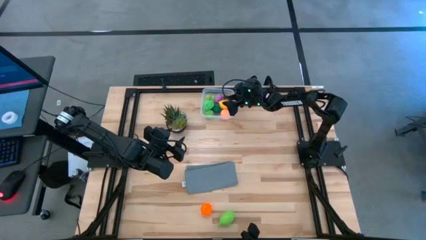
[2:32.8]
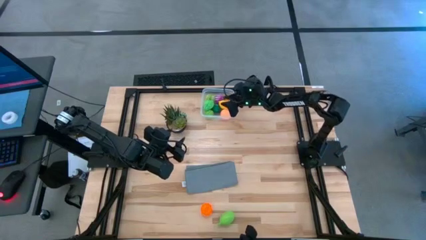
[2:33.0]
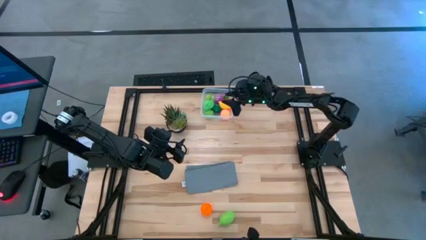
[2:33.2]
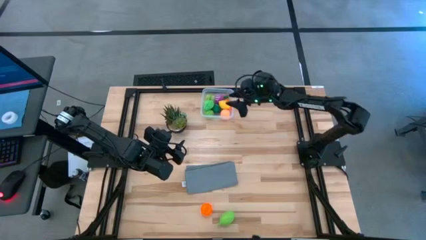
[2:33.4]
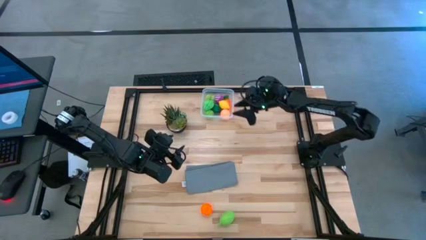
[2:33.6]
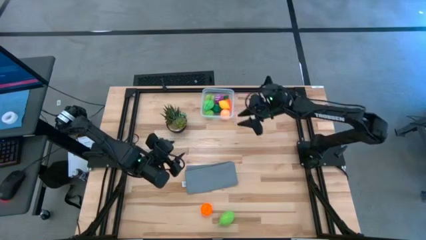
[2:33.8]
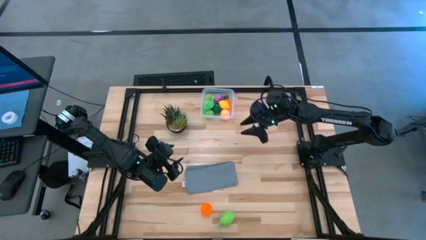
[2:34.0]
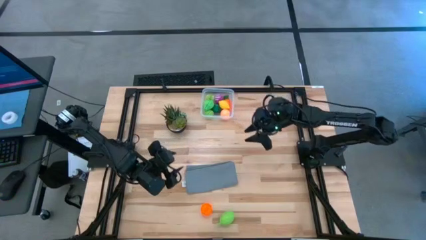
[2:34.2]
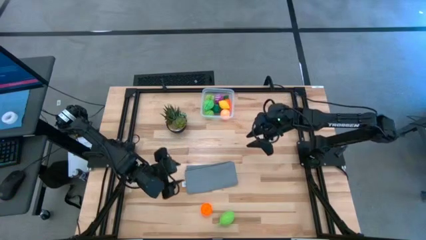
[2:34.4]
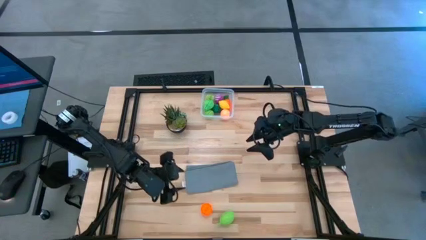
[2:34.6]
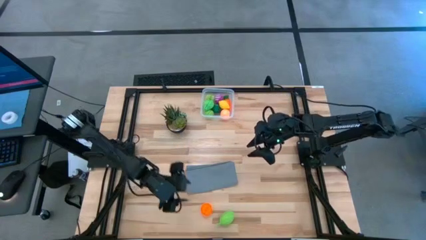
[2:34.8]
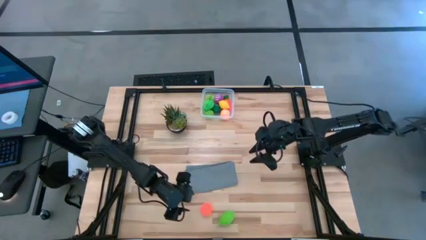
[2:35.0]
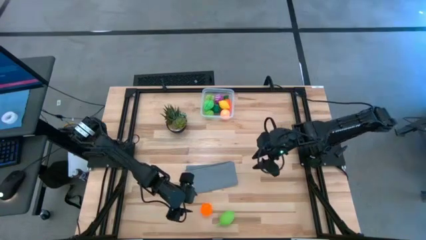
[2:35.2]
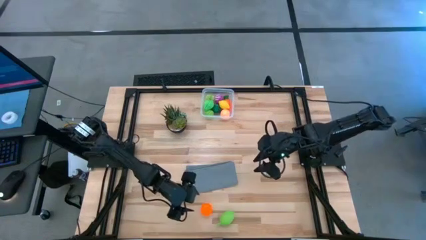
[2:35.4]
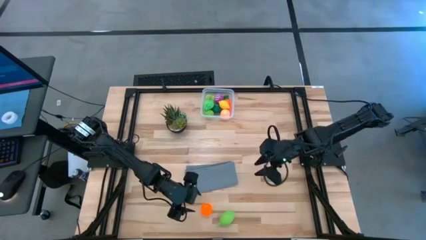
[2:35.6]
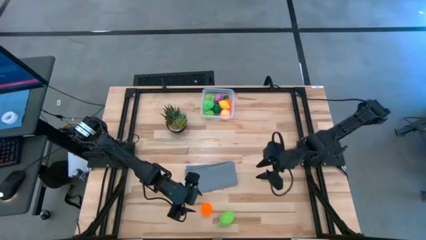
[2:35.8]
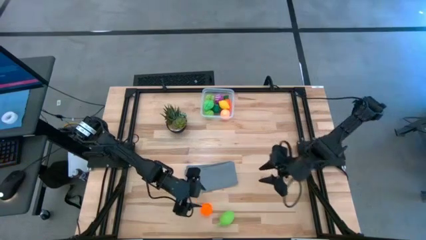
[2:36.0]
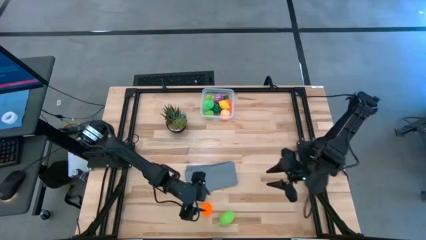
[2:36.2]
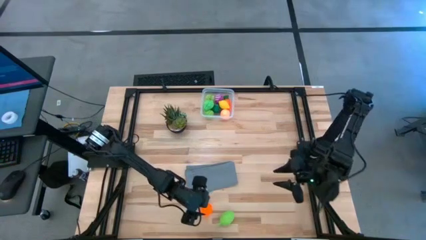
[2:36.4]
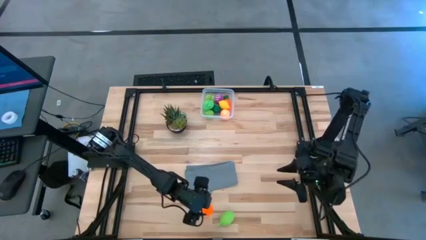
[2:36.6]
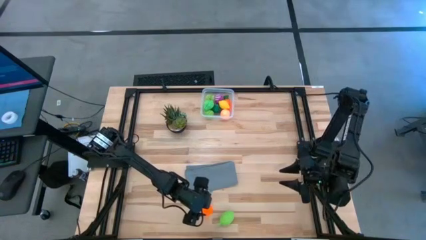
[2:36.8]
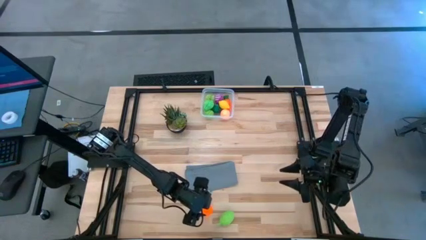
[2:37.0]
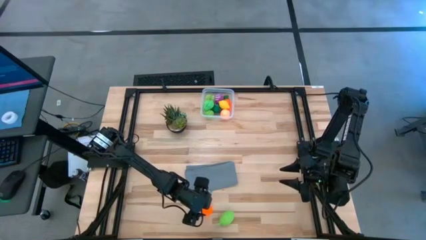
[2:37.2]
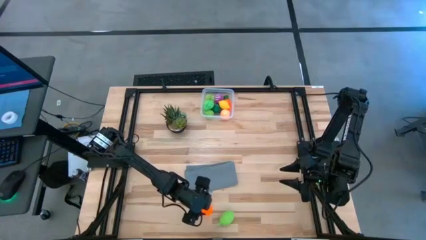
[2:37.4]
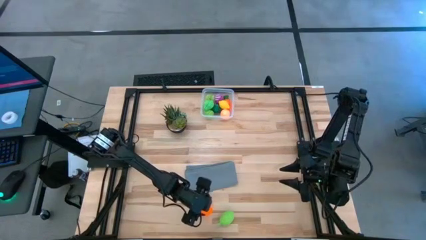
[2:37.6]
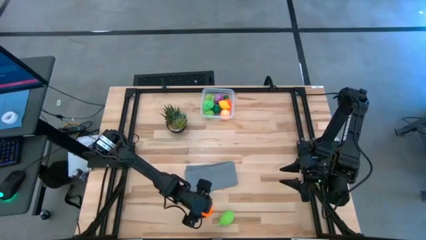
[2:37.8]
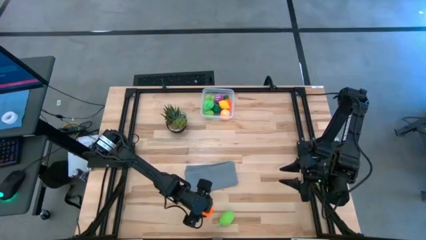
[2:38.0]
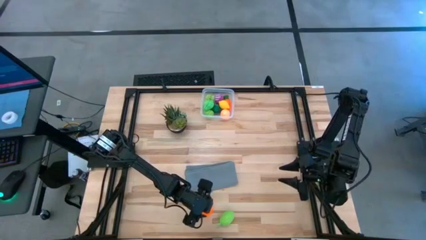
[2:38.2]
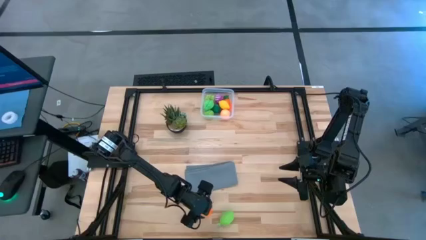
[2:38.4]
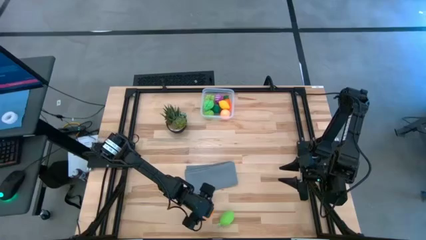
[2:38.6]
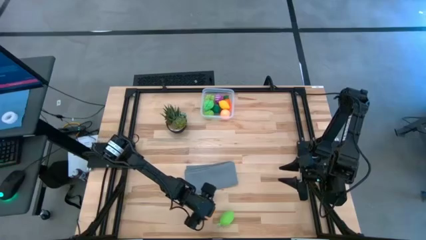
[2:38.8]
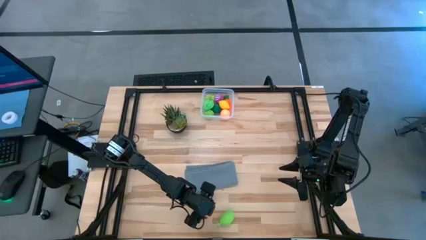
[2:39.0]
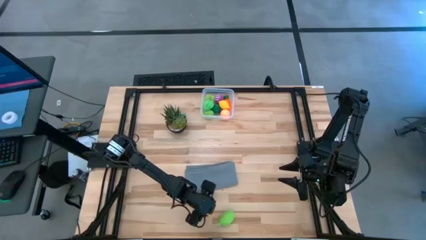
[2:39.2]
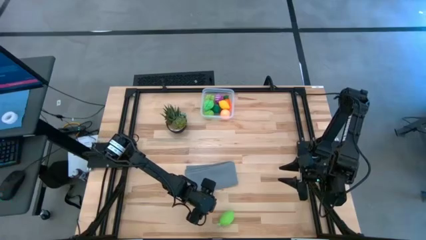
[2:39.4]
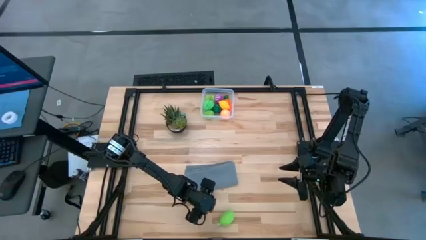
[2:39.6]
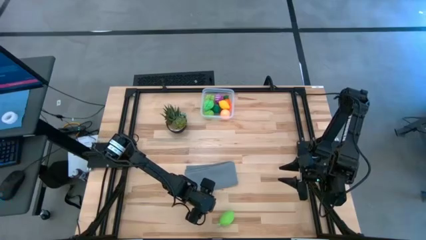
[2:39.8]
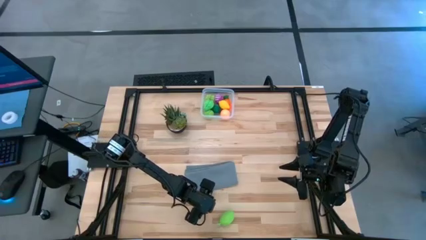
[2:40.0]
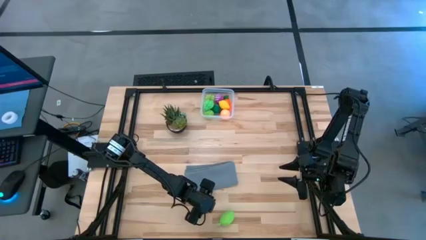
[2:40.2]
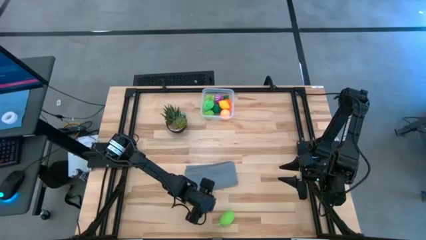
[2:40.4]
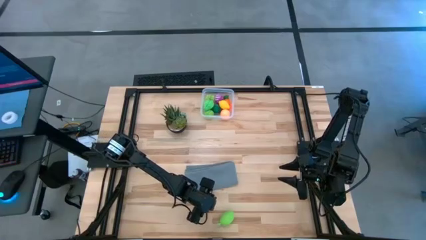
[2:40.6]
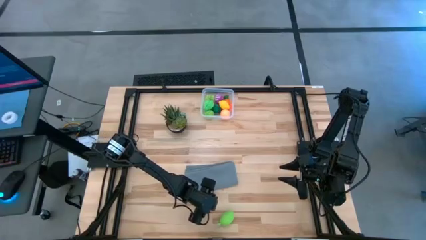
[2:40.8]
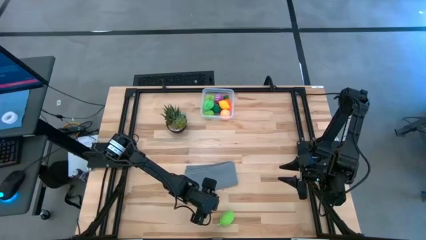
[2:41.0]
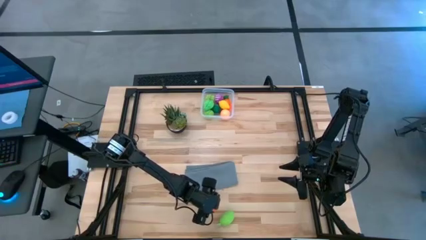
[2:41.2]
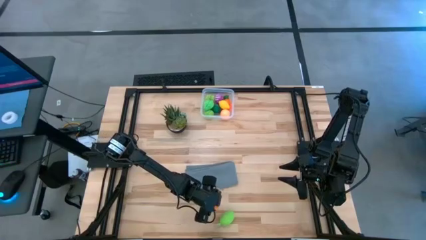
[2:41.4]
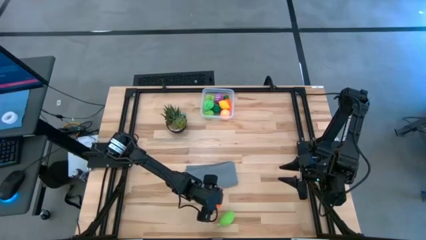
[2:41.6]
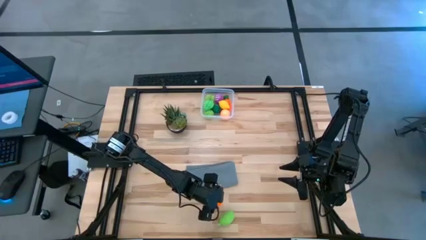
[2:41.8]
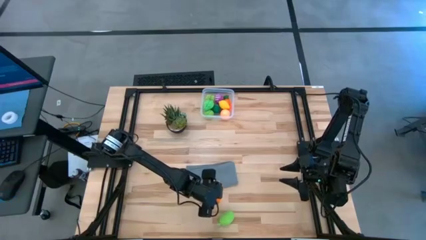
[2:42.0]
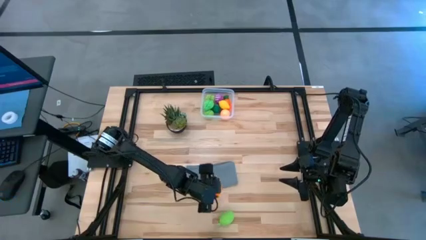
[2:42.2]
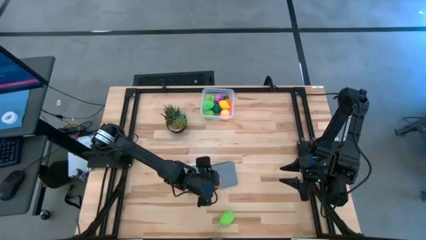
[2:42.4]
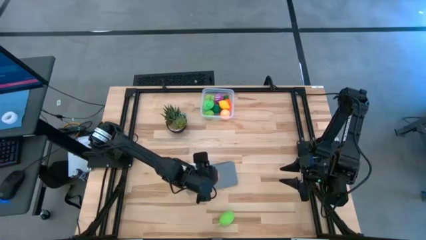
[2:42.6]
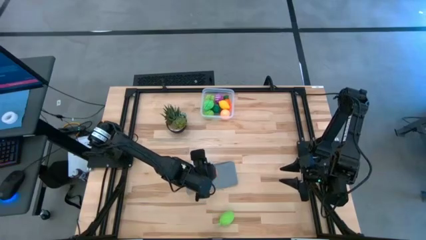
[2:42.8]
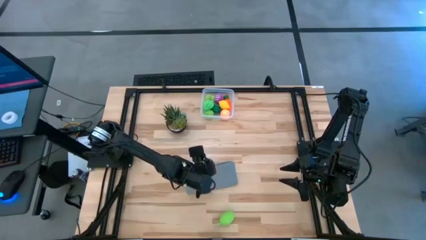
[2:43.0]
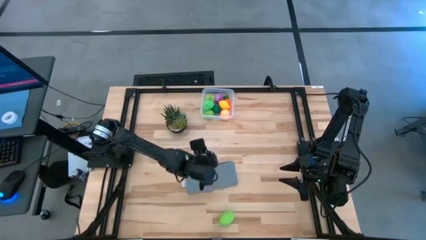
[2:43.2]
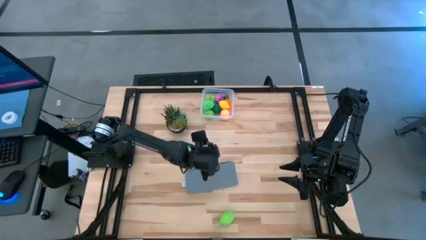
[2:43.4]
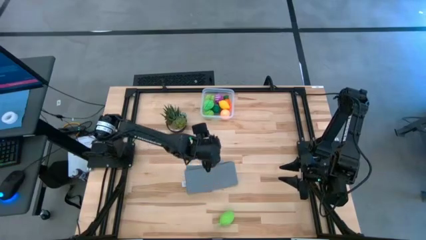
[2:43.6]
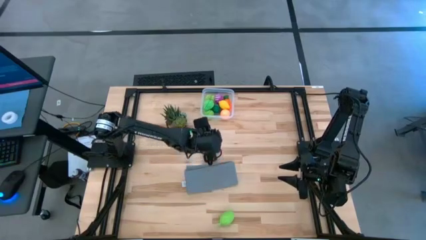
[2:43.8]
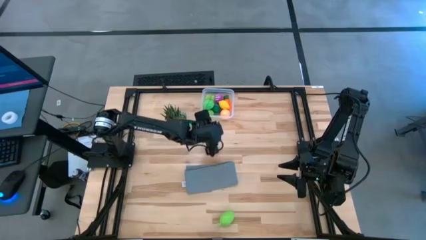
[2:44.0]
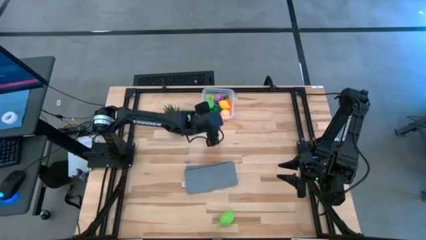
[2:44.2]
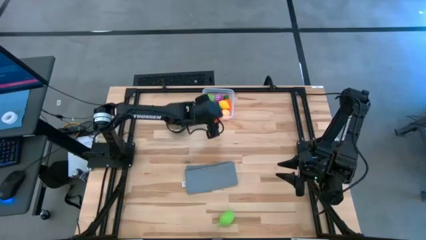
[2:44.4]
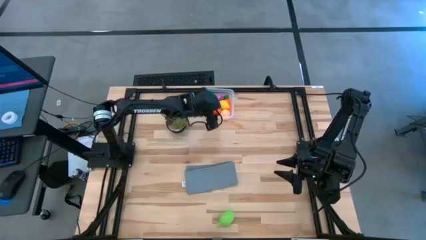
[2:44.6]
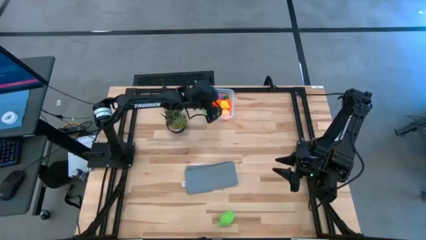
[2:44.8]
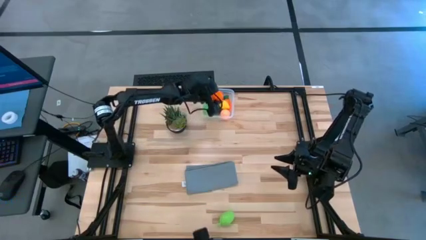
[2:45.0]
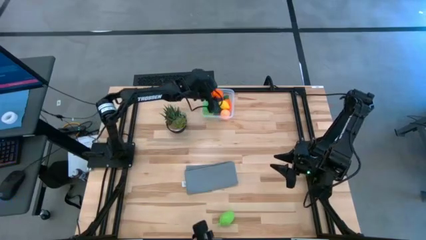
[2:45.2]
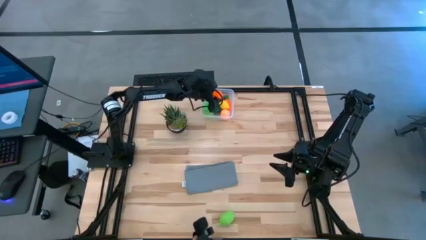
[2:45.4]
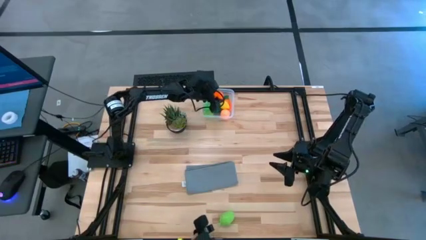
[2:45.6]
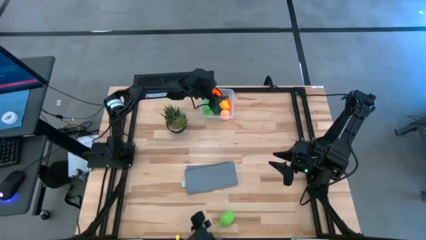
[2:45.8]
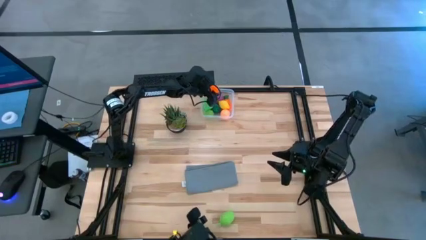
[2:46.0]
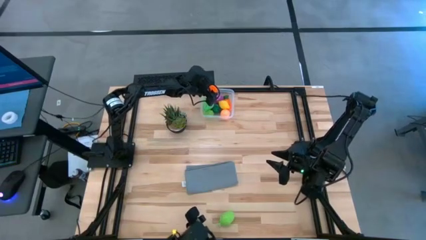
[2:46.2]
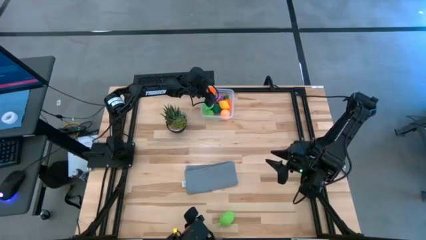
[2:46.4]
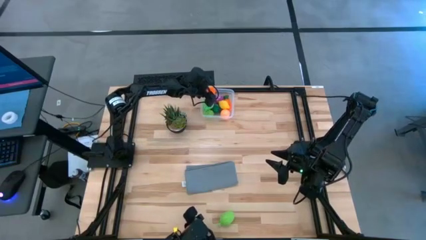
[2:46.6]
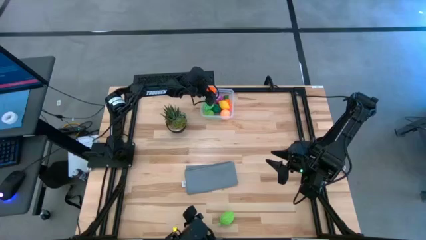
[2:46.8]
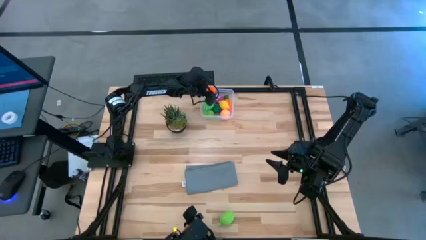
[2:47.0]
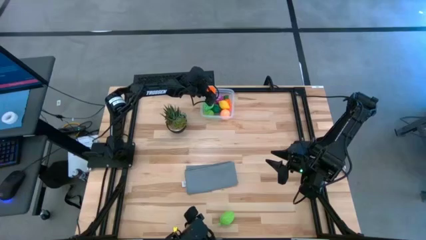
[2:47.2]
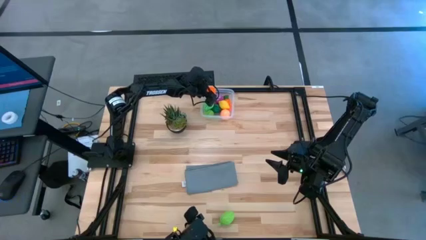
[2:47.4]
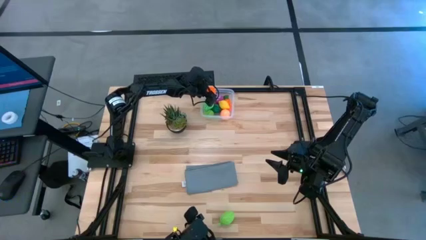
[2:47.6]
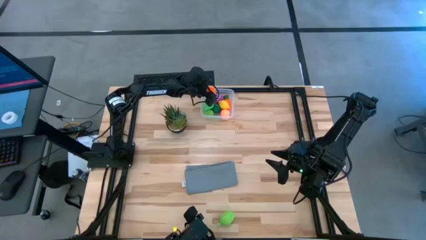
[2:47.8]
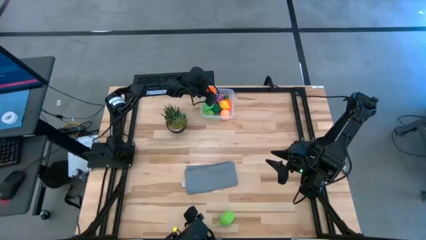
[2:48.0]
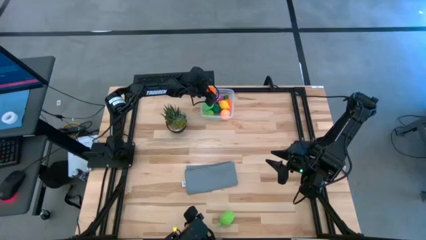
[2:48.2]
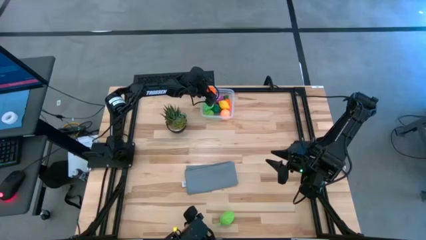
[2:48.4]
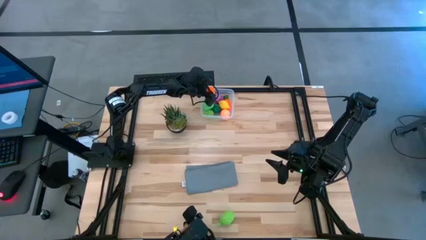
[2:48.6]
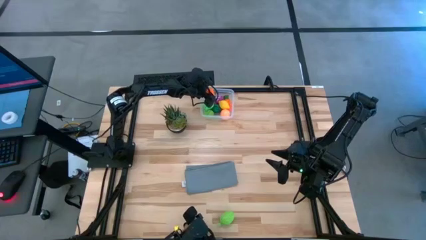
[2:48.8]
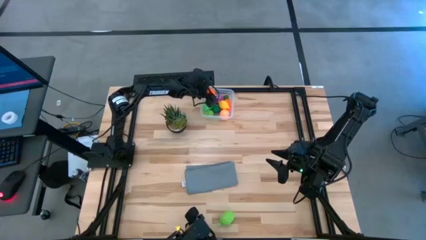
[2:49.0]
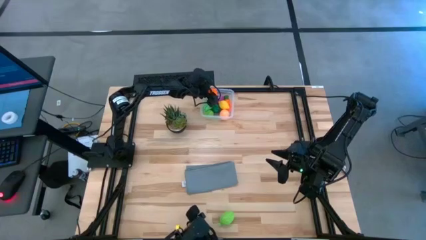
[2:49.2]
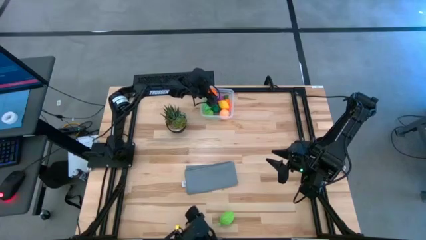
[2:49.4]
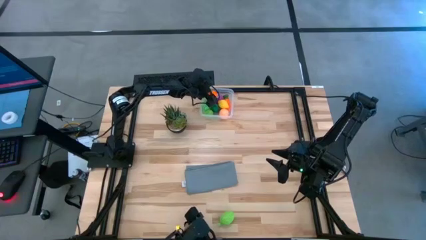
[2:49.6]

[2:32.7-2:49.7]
Task: Pick and placing Produce into tupperware
Put the tangerine into the bin
